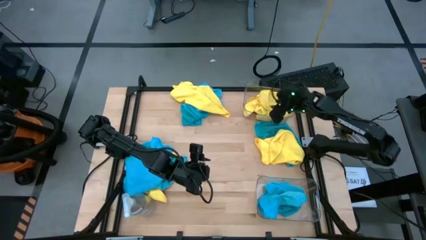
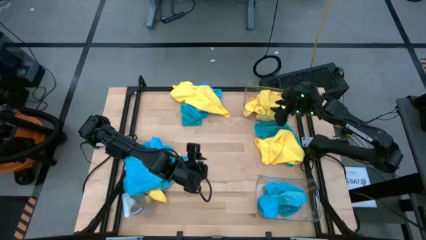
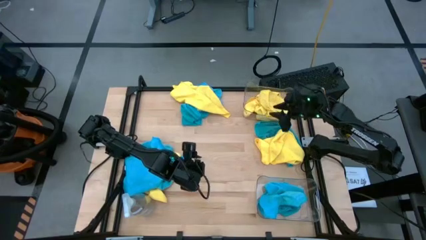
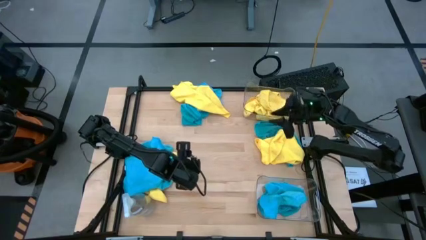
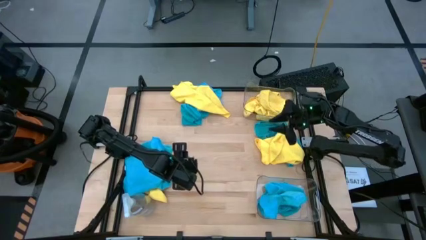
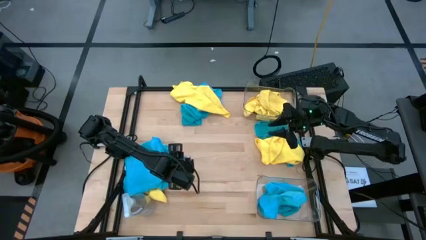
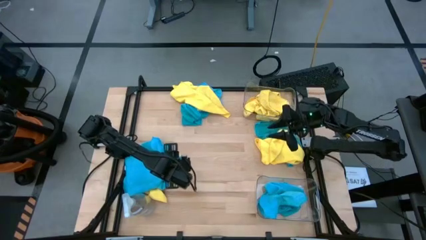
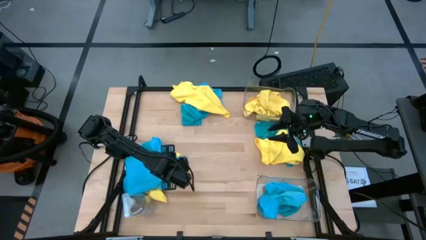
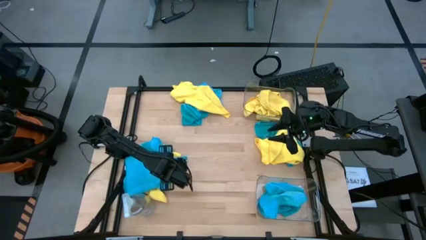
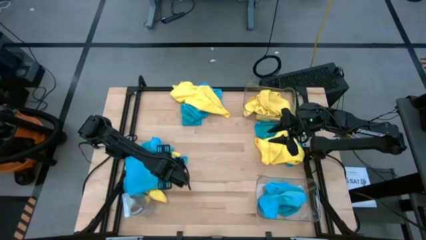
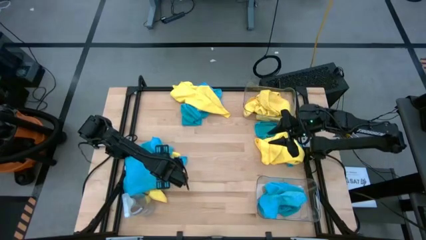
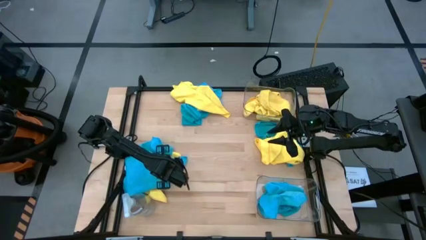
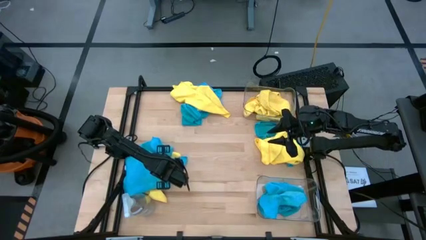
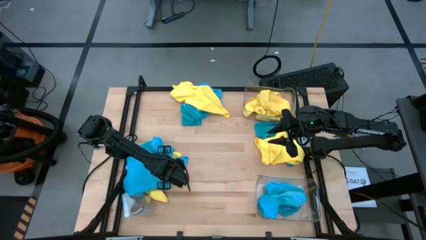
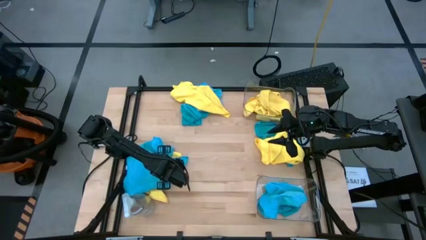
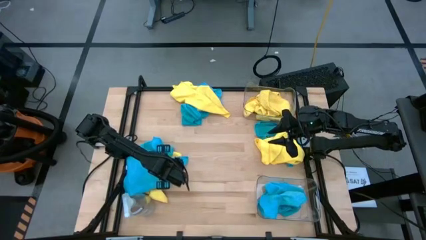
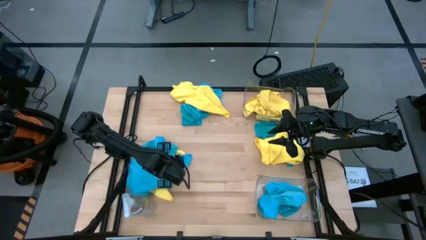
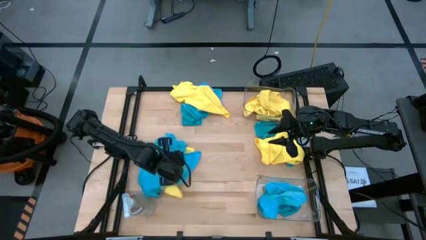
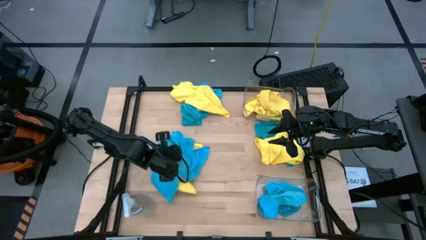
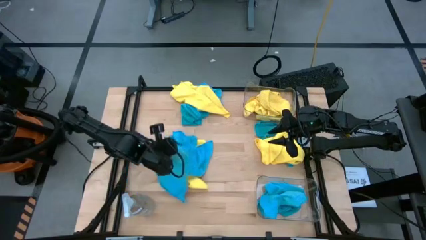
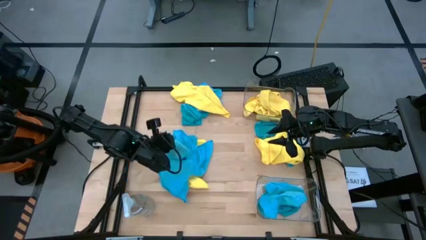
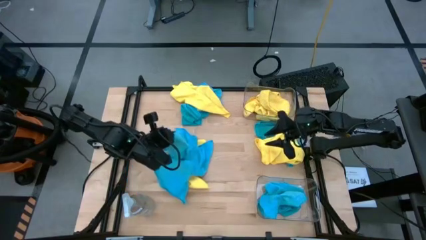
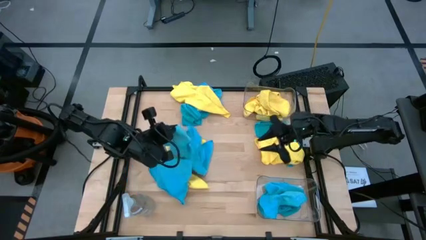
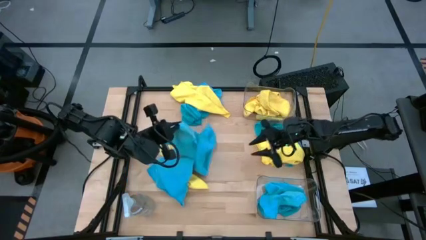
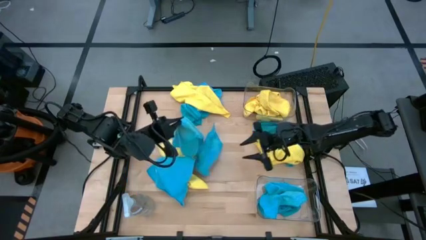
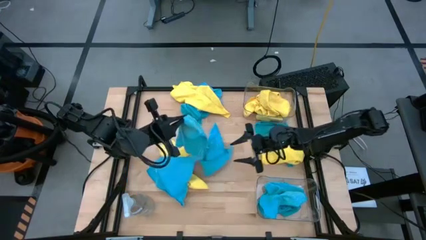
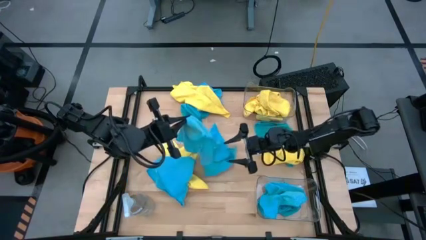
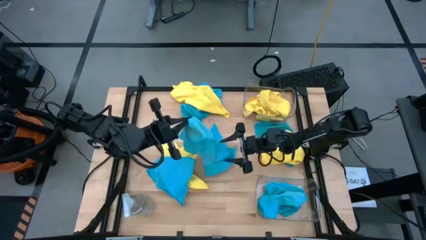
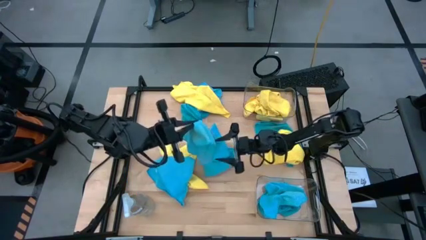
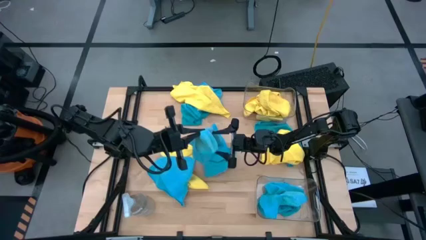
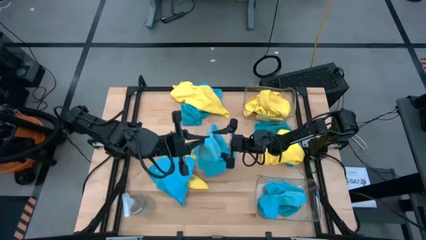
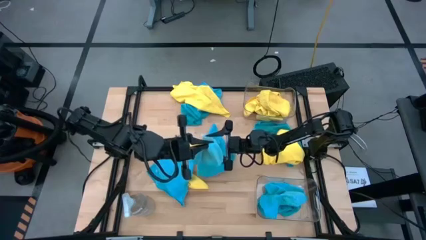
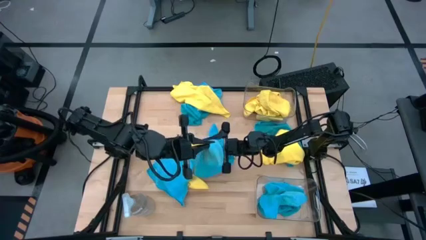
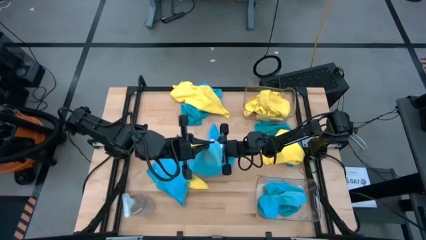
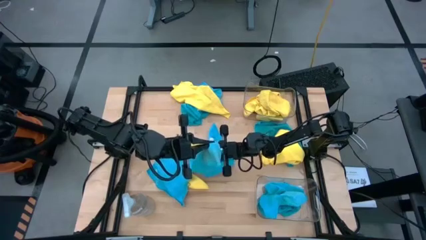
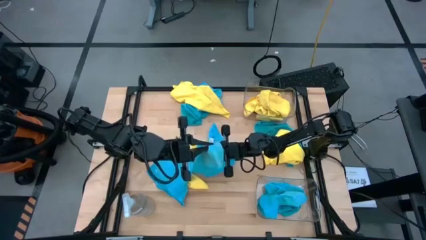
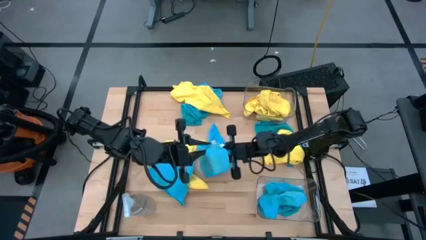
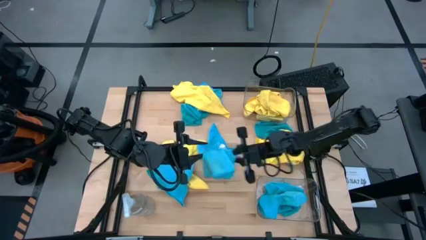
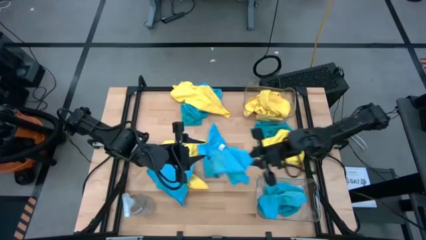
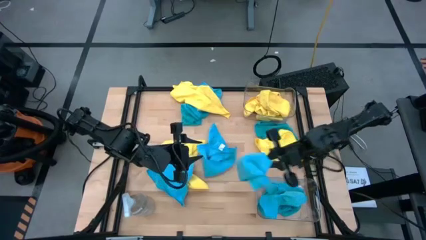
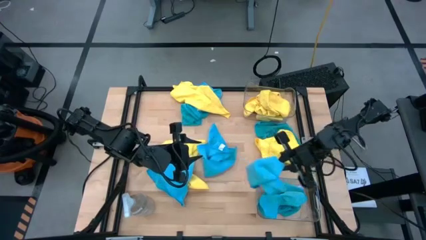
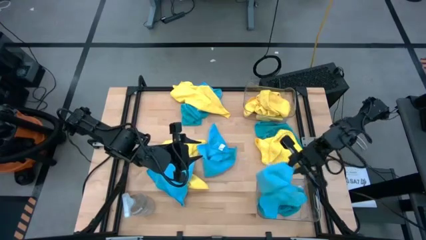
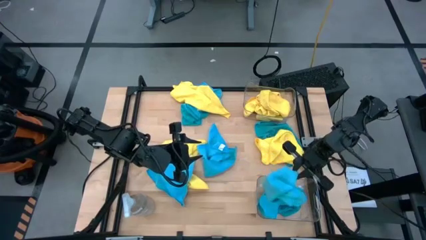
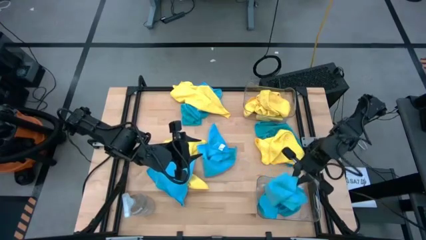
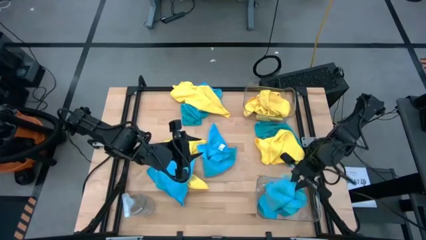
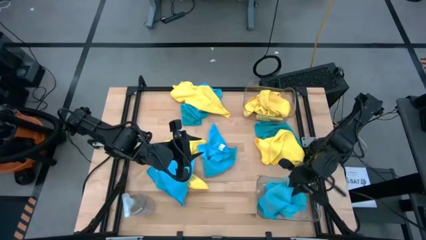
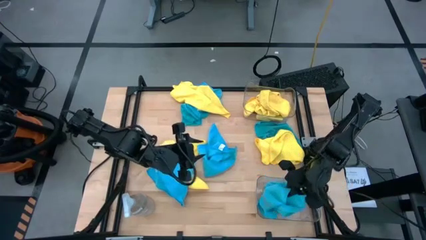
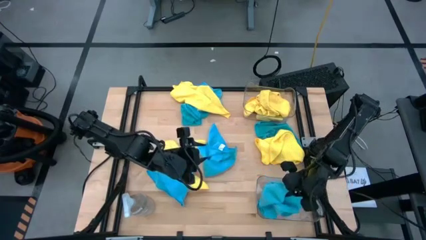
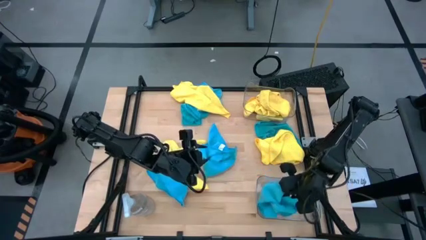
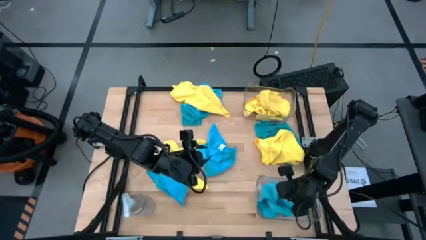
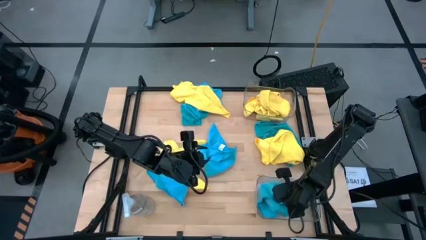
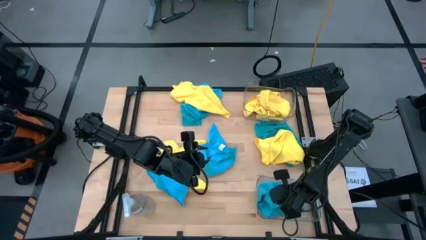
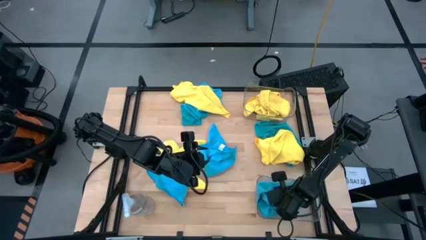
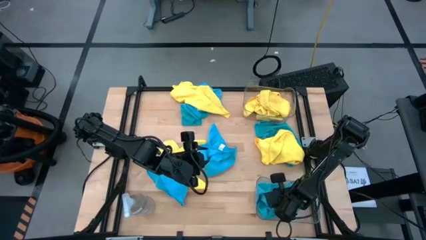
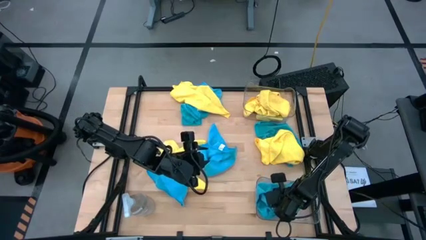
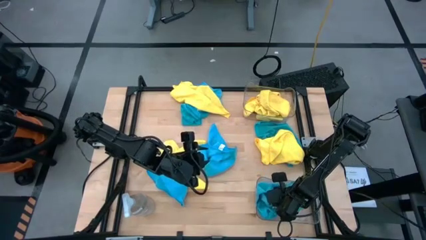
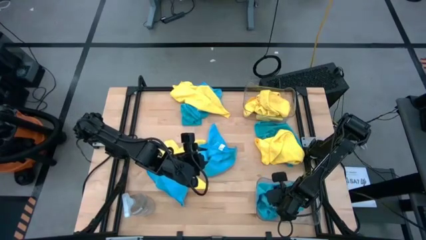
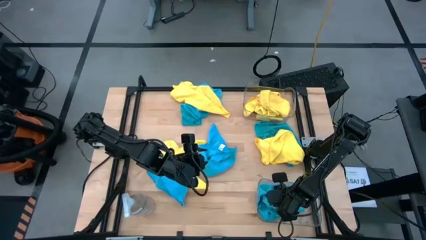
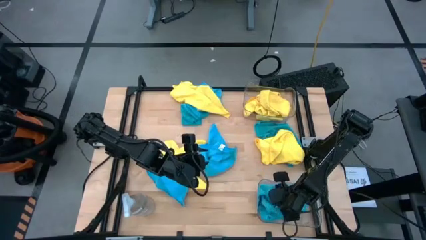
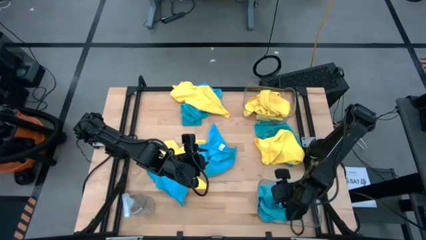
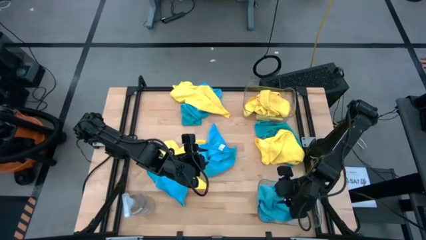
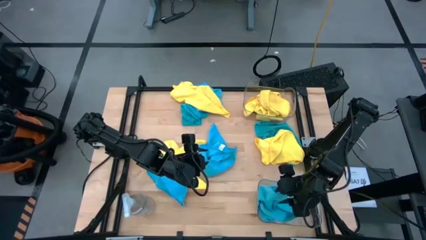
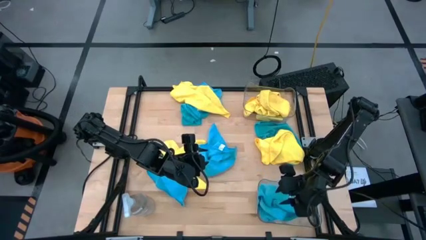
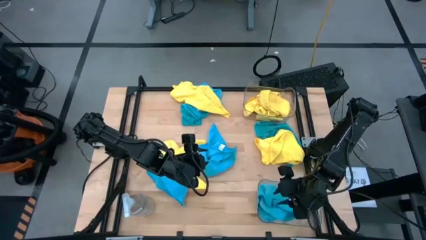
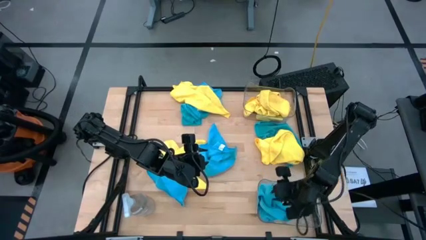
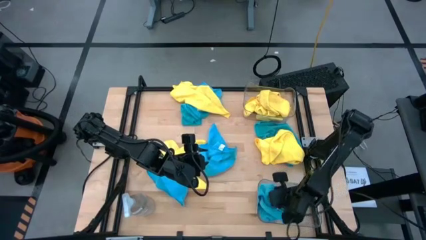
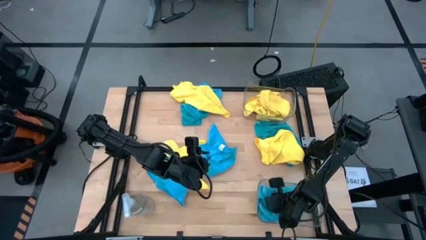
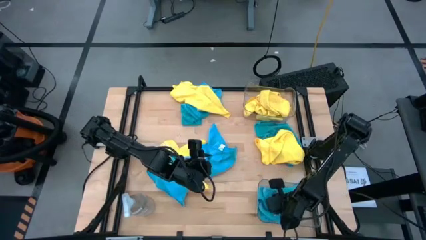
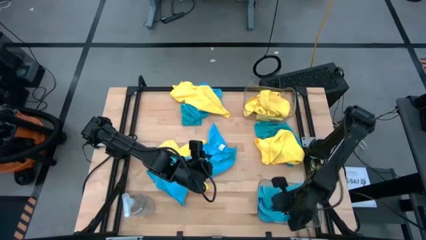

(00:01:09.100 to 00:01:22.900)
Task: Sort microfiber towel by color & place in baskets
Put the blue microfiber cloth into the bottom transparent bin
